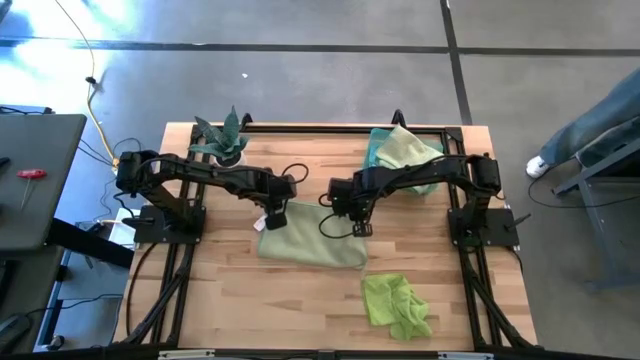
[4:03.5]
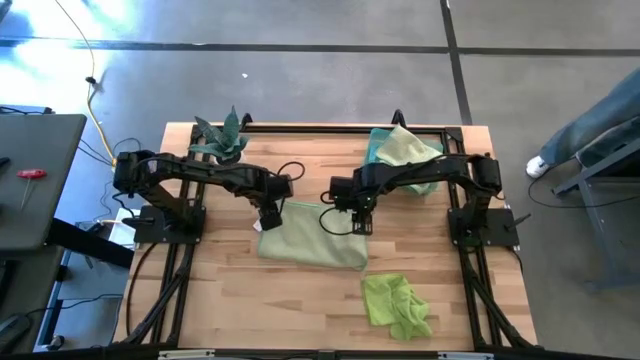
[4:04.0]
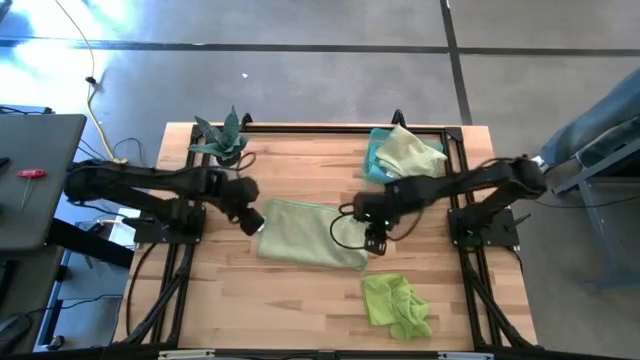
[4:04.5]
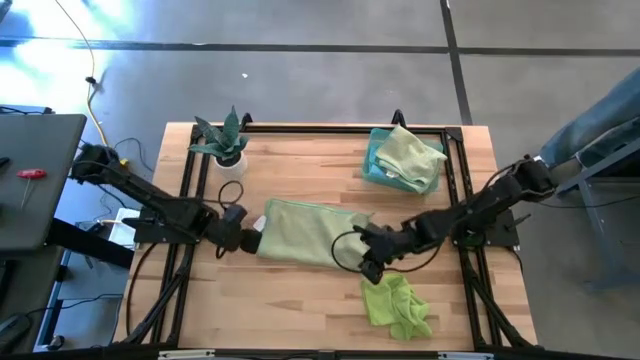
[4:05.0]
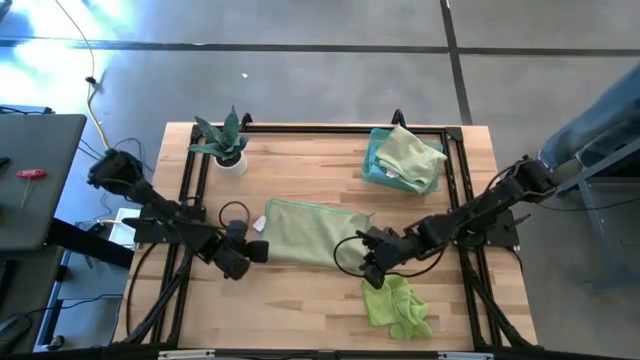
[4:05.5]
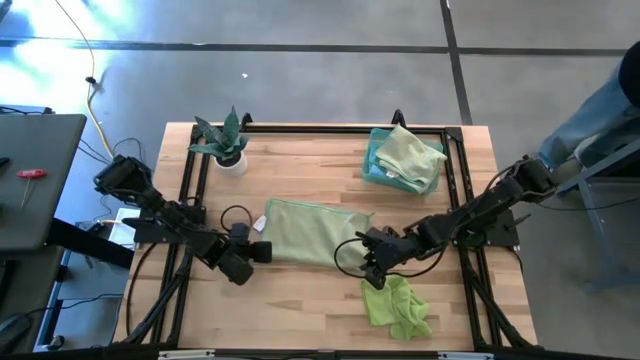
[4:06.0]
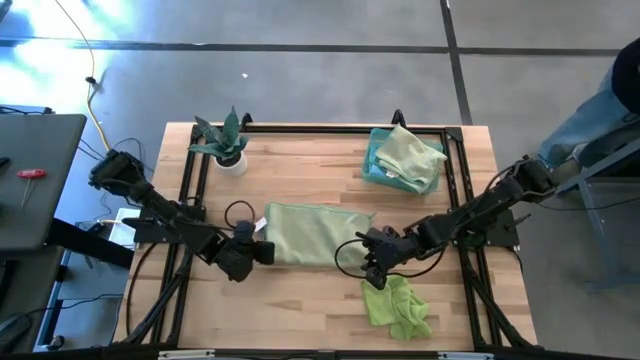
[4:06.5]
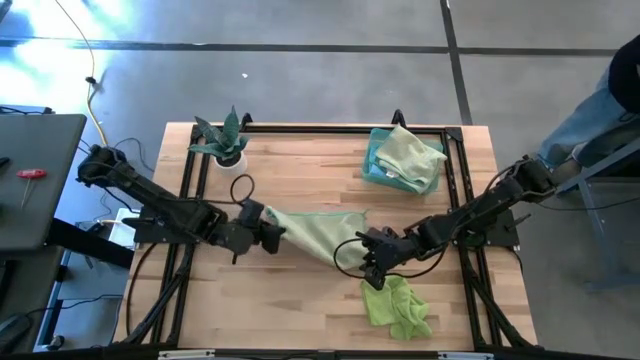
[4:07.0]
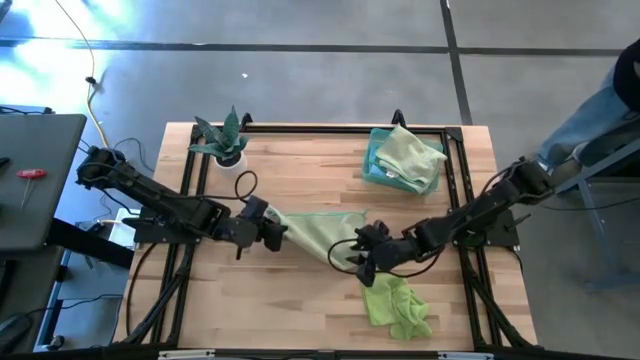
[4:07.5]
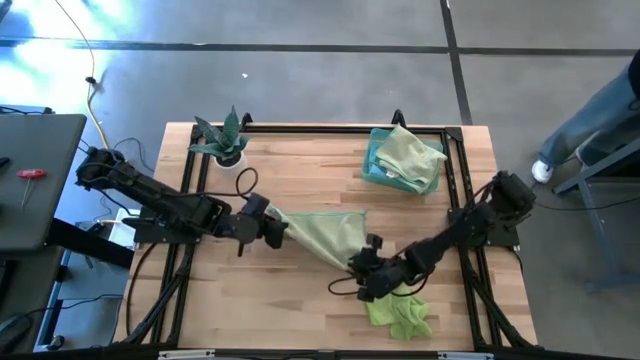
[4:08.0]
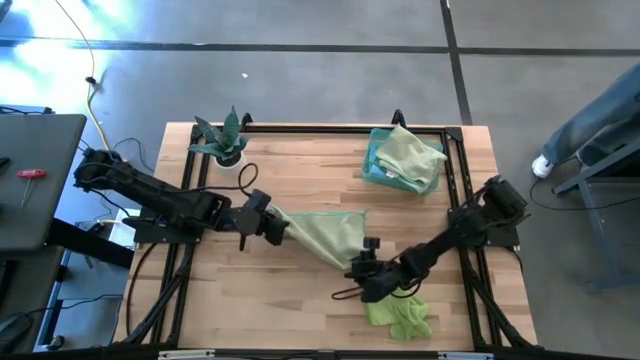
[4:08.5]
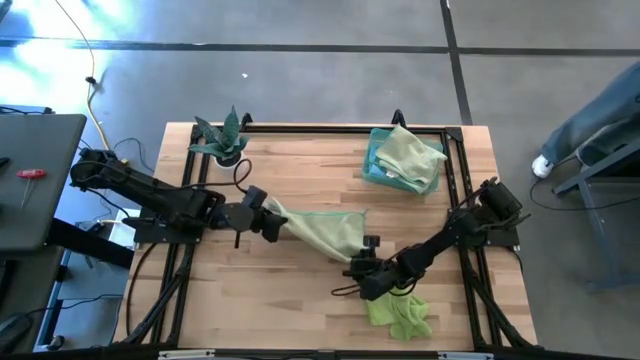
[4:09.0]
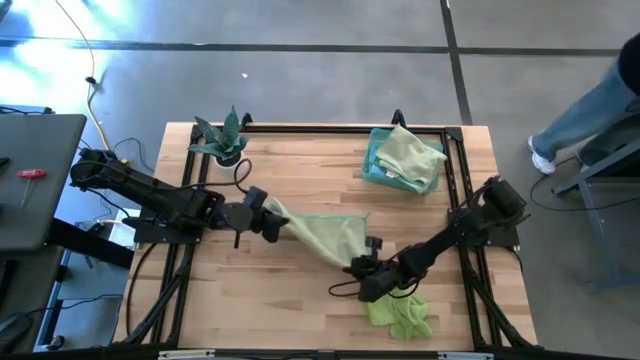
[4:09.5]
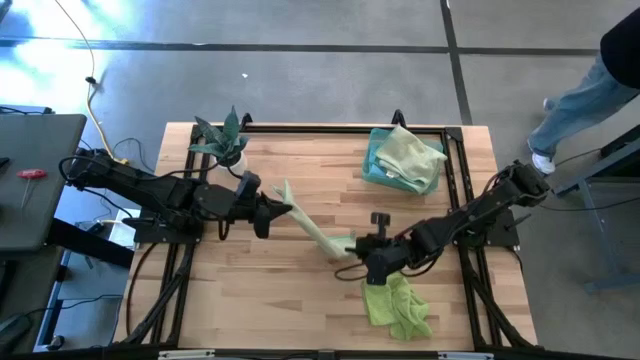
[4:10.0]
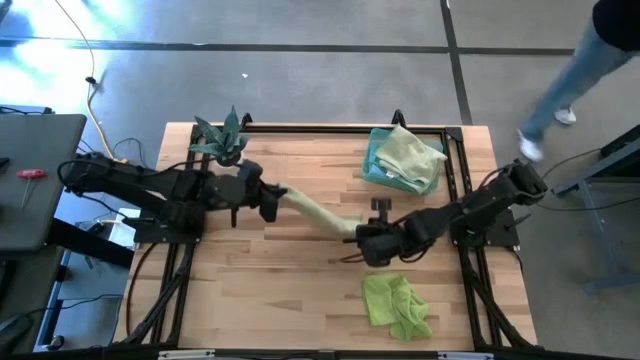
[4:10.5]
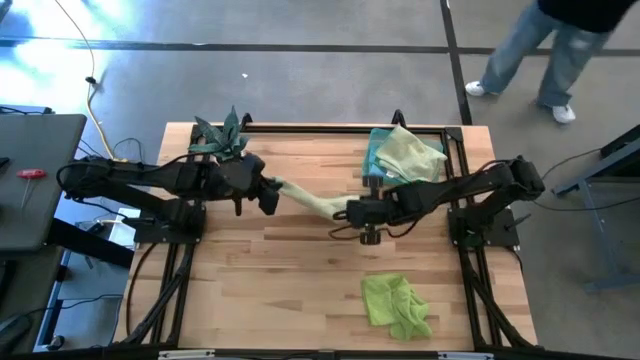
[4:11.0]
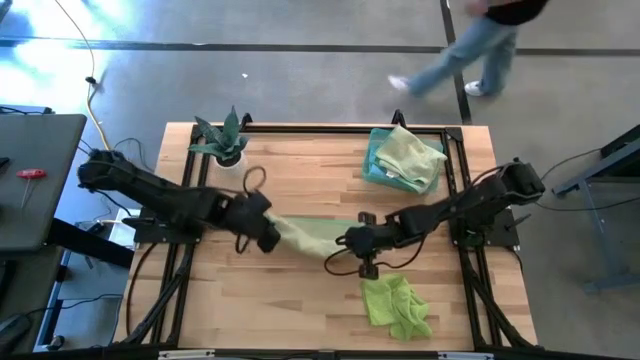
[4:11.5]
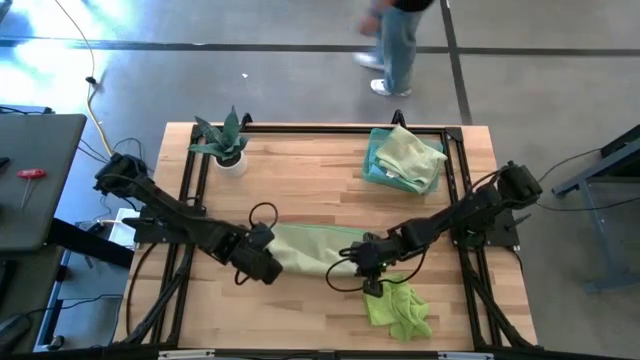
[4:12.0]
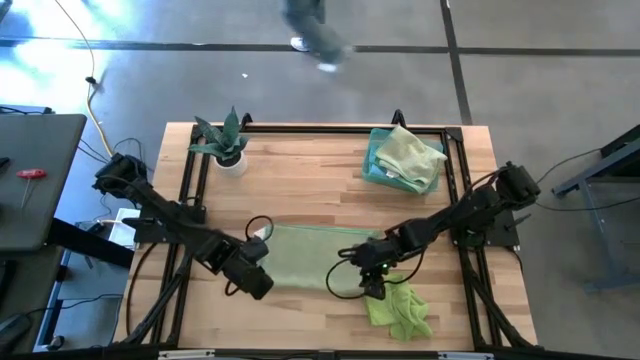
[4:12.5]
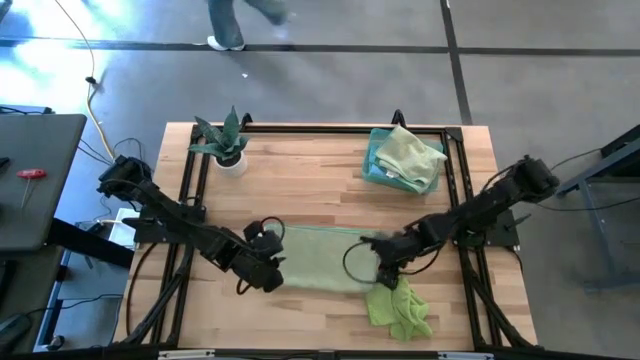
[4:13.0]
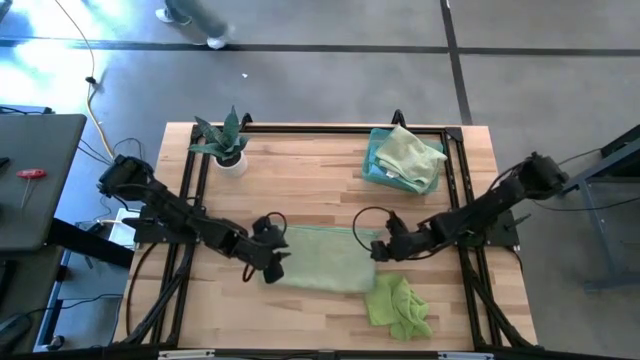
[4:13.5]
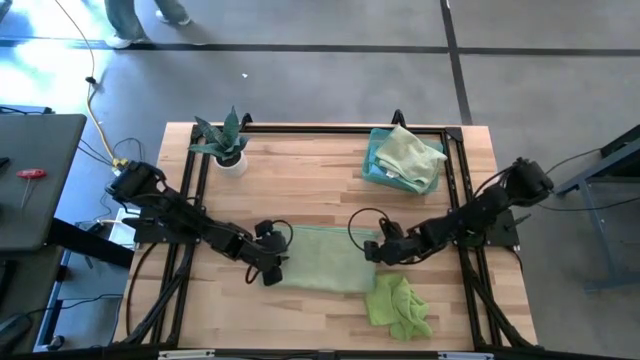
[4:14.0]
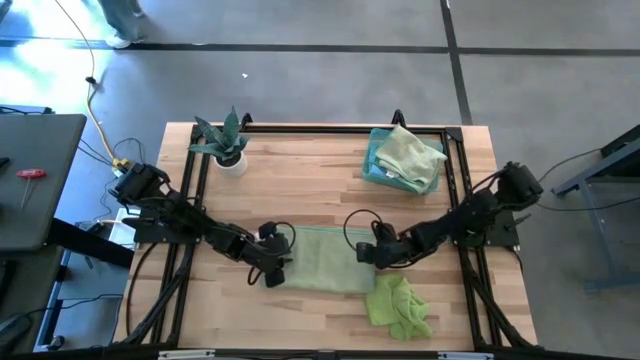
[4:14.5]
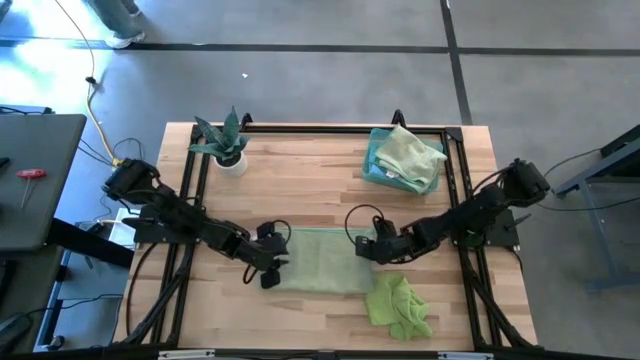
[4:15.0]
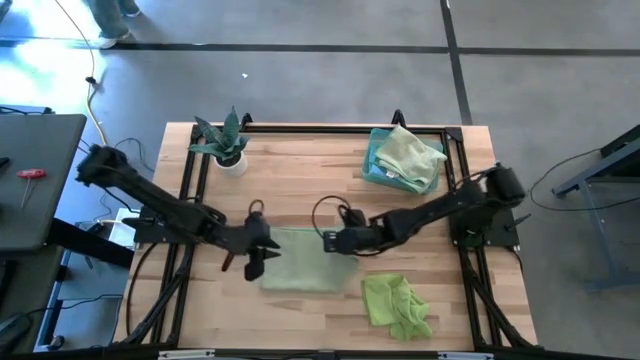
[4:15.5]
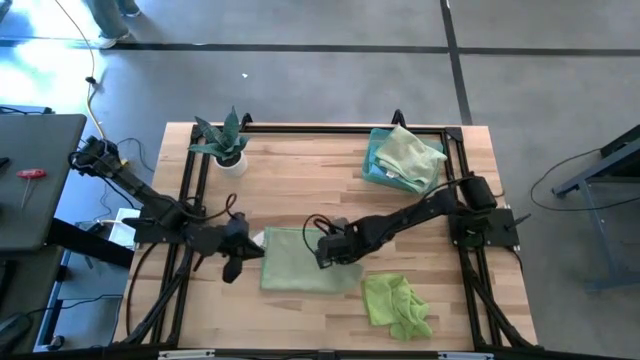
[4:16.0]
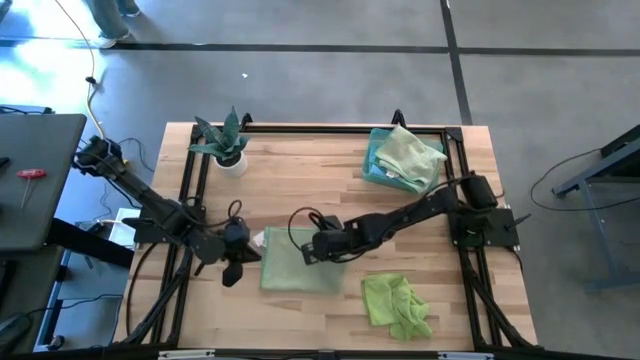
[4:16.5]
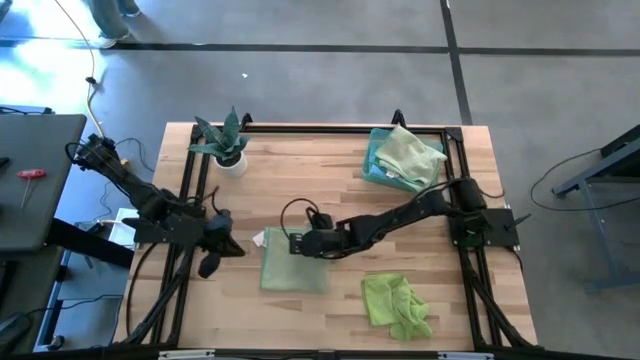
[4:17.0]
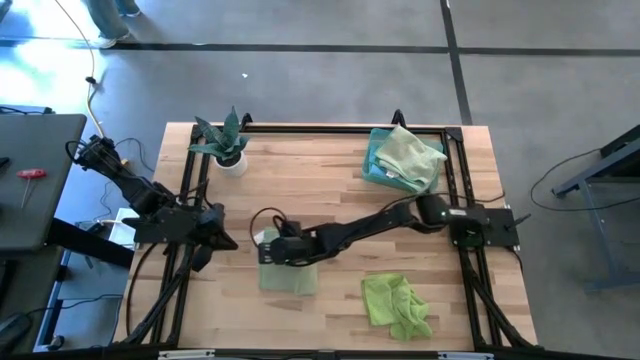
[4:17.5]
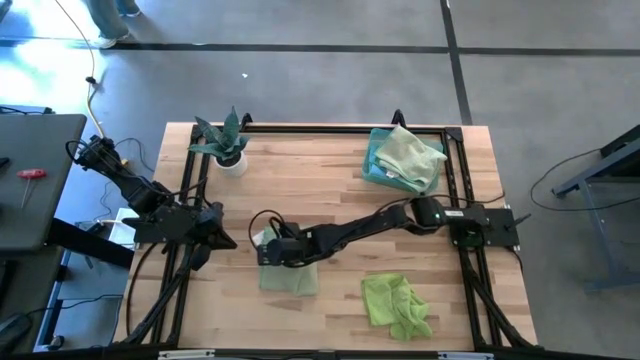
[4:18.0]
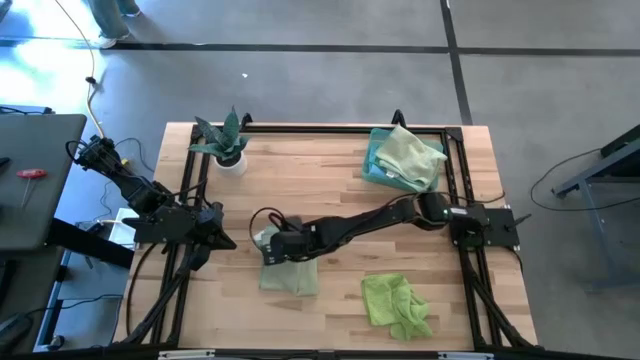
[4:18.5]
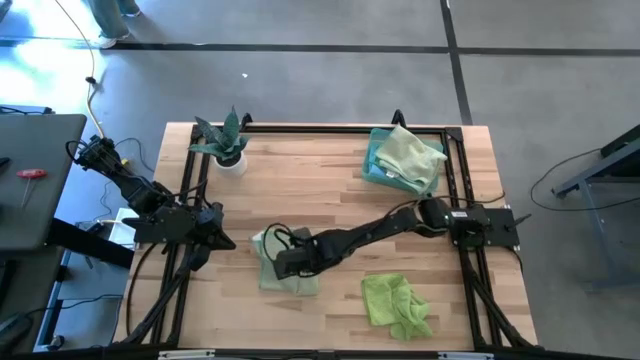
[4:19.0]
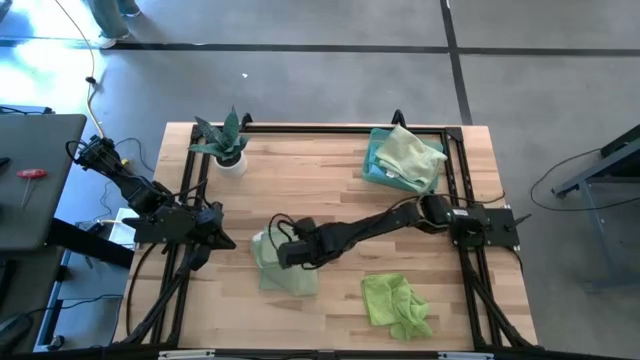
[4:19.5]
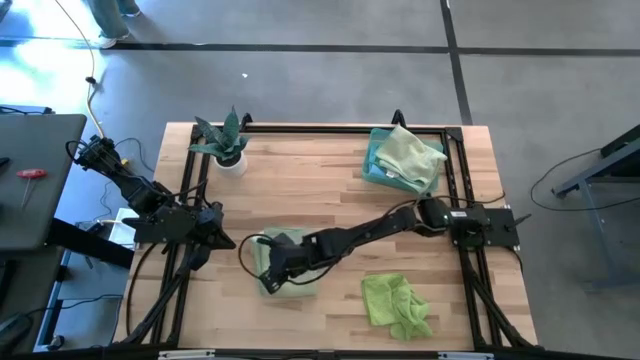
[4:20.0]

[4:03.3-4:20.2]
Task: Fold microfiber towels
Fold the green microfiber cloth

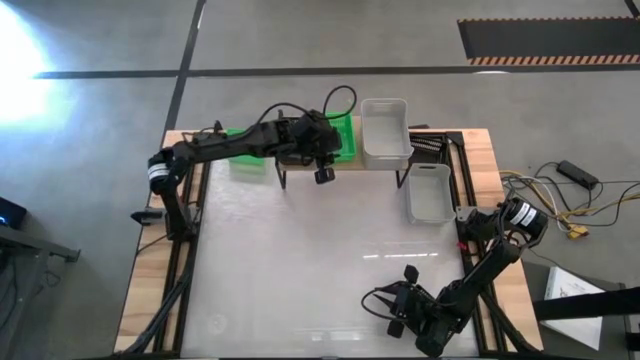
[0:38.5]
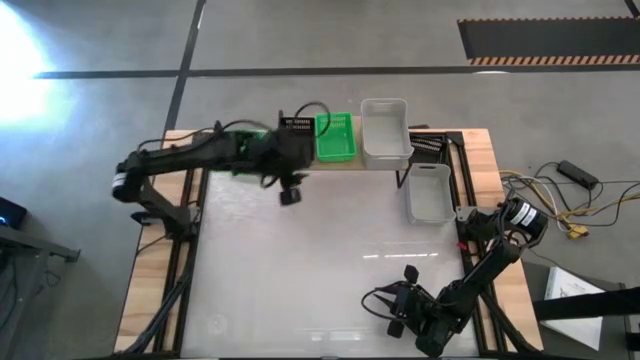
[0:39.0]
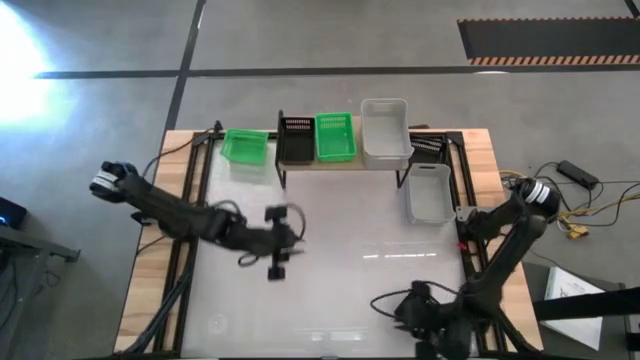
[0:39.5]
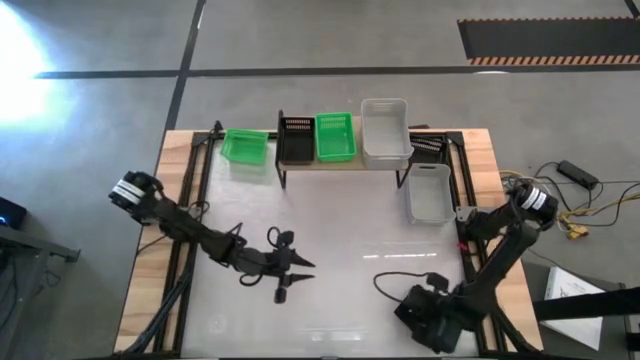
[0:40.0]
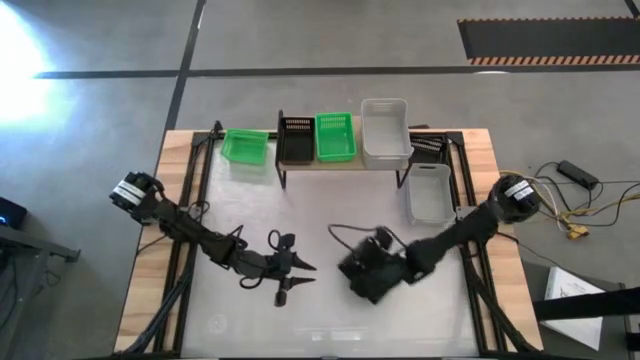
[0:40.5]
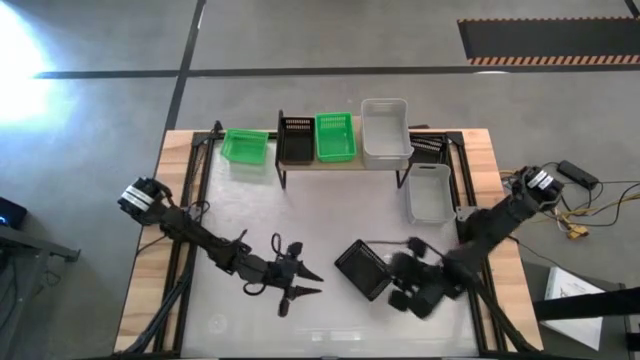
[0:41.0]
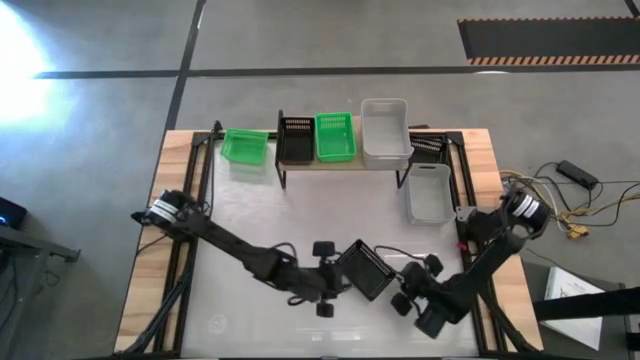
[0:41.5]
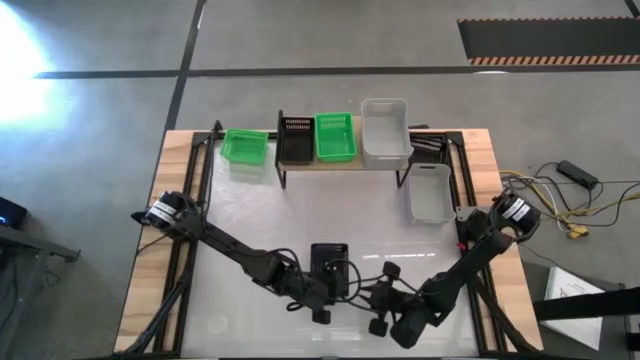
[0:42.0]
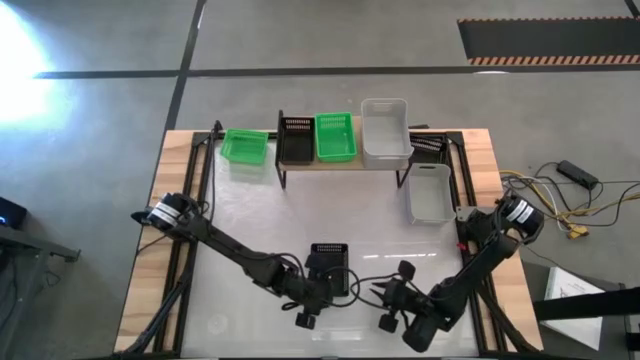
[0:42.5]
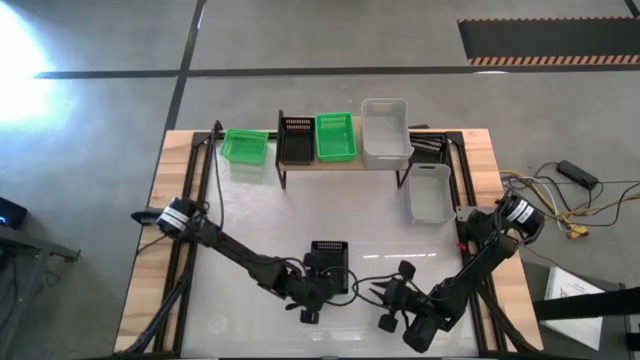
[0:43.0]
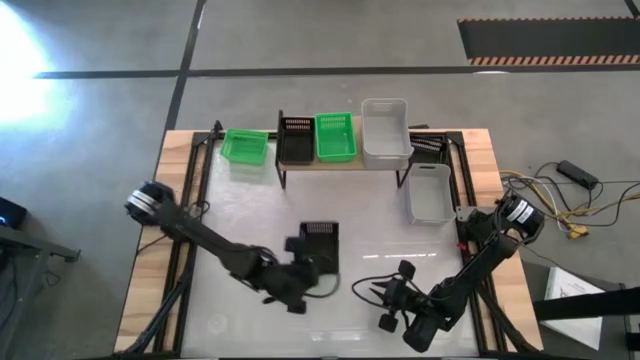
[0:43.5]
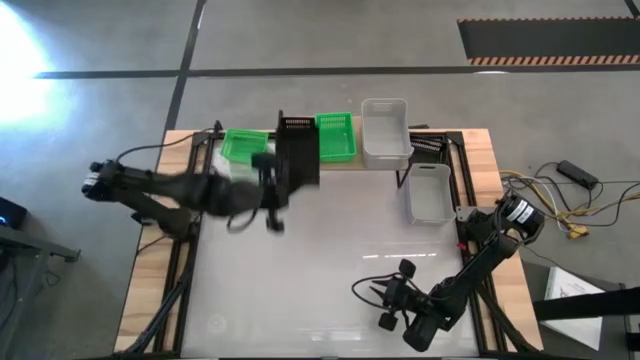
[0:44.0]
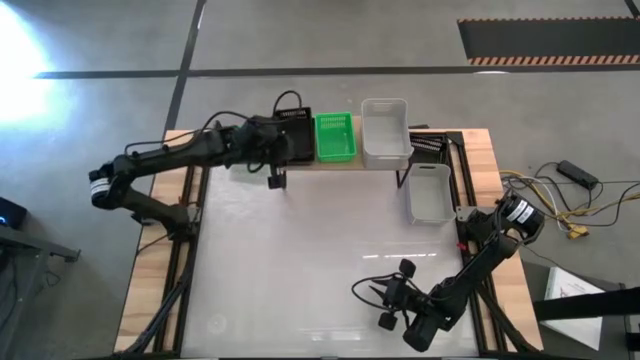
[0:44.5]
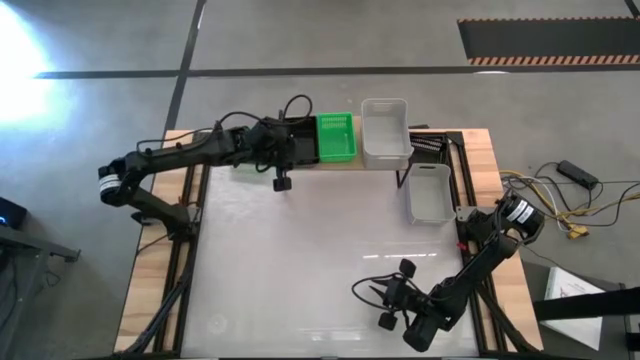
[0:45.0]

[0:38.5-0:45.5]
Task: Stack baskets on shelf by color
Stack the bottom black bin on top of the black bin on the shelf
